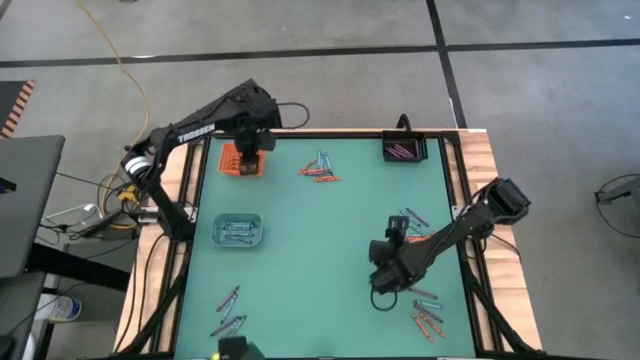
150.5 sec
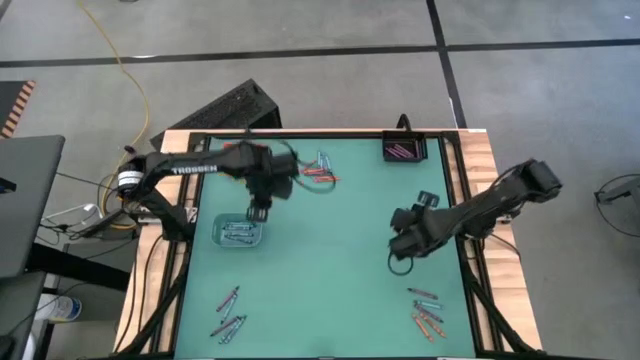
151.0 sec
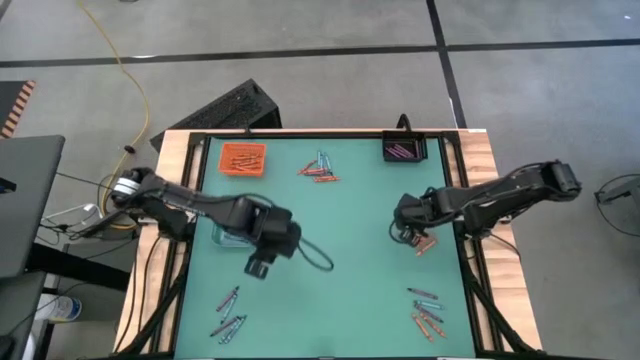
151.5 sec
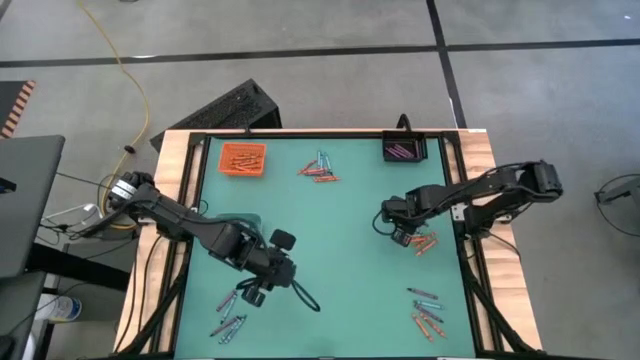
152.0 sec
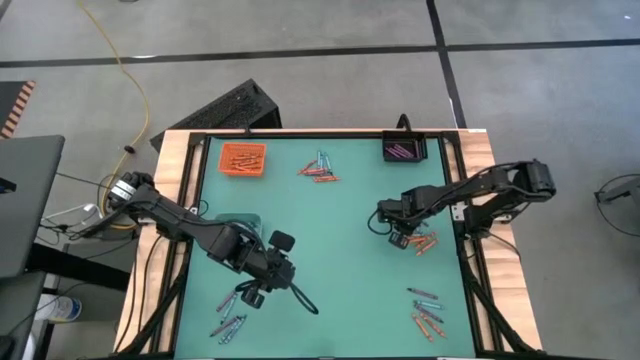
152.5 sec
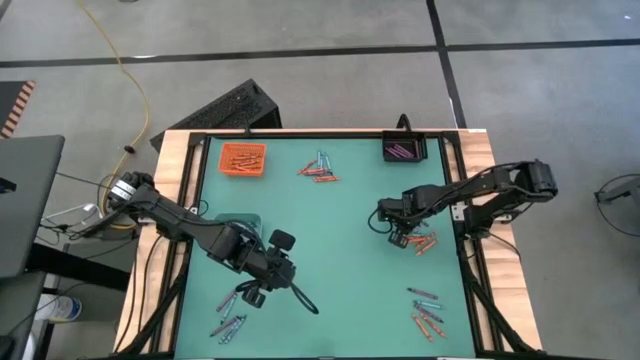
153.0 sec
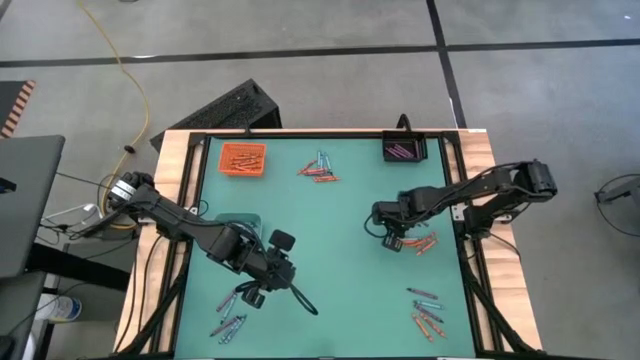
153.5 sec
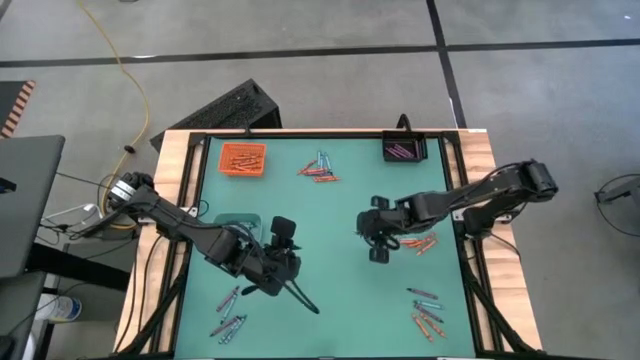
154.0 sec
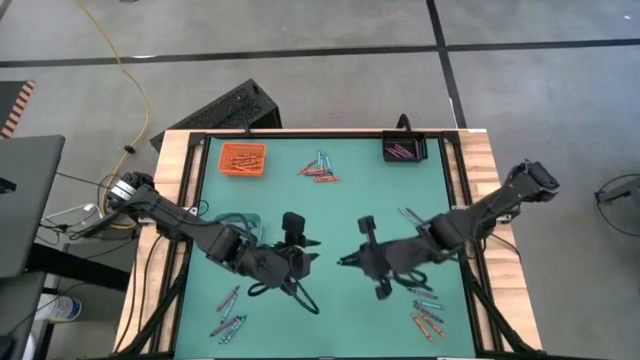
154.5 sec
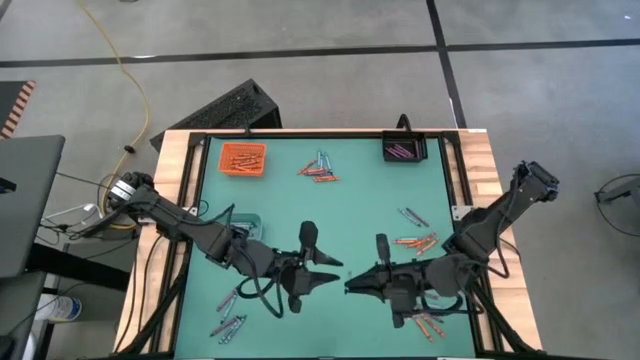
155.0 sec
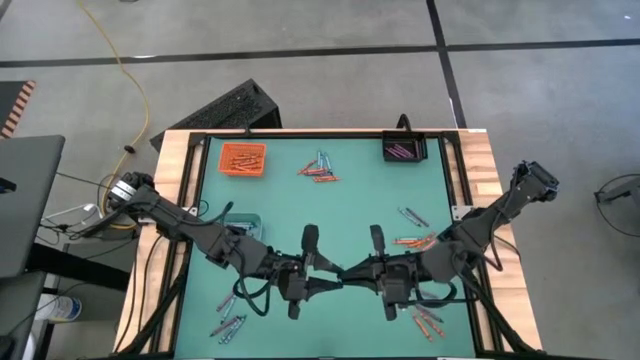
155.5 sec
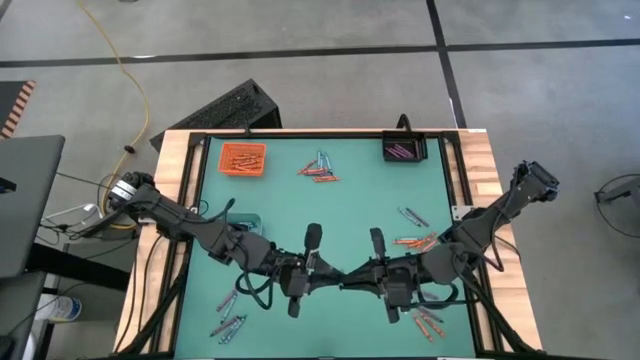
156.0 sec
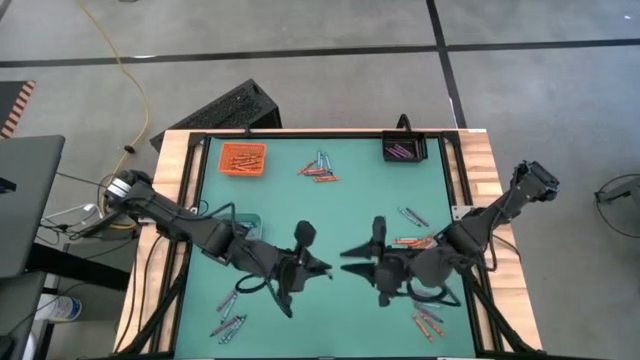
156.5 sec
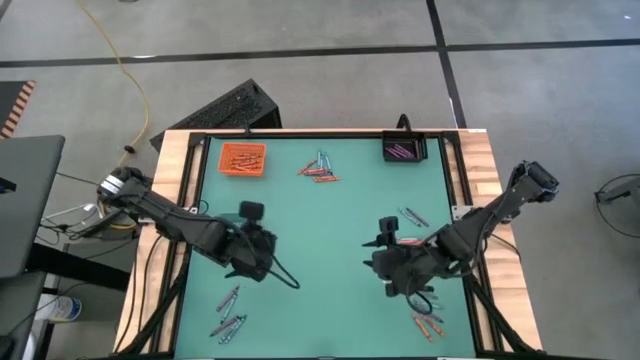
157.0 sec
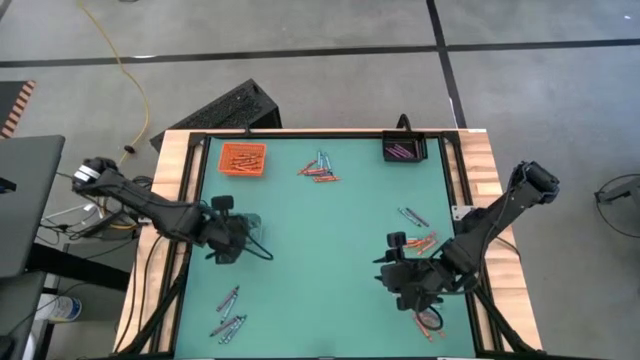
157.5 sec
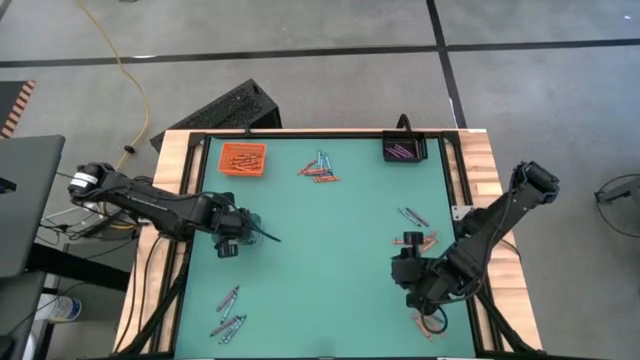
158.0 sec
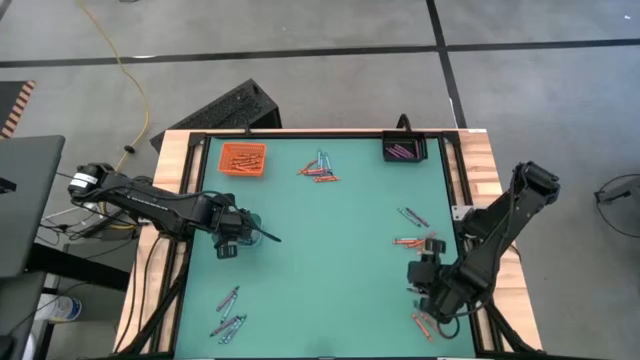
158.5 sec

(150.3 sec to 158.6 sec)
Task: Sort crayons
Put the blue crayon into the left blue bin

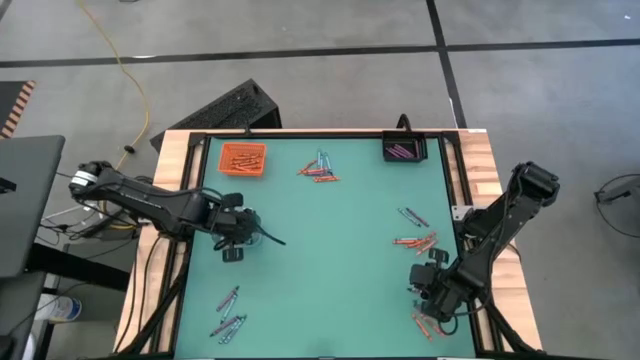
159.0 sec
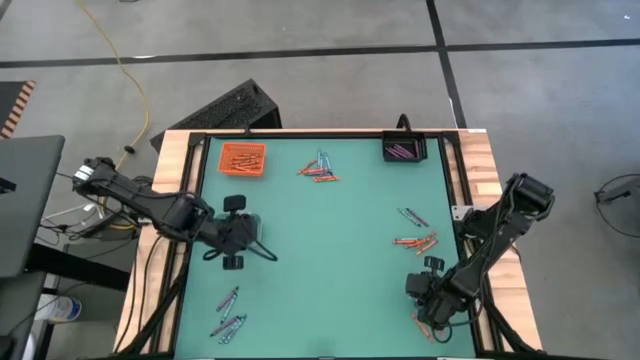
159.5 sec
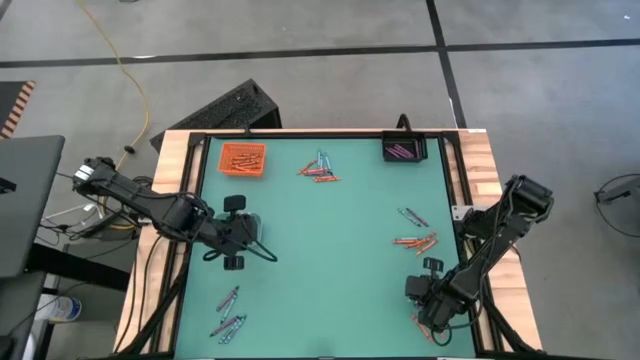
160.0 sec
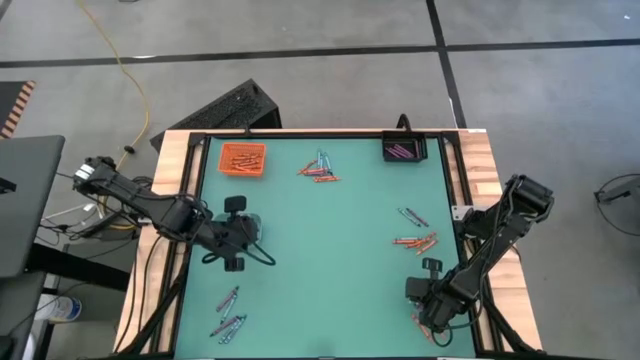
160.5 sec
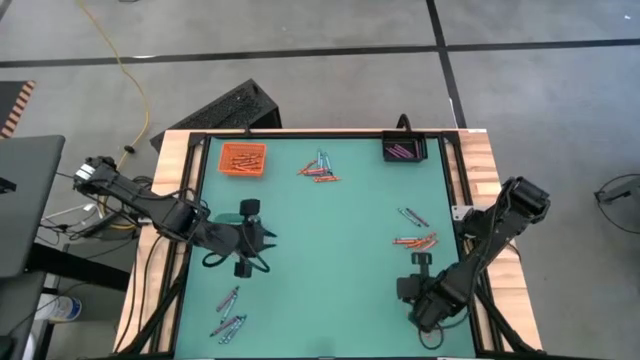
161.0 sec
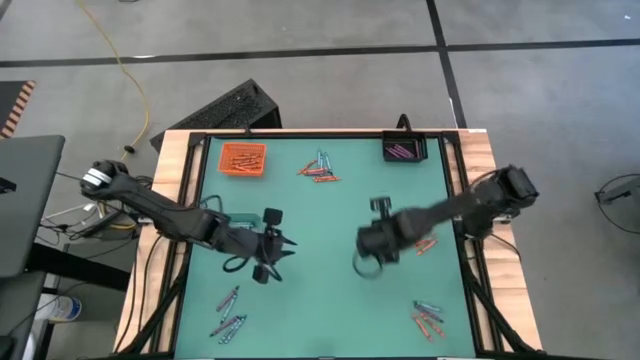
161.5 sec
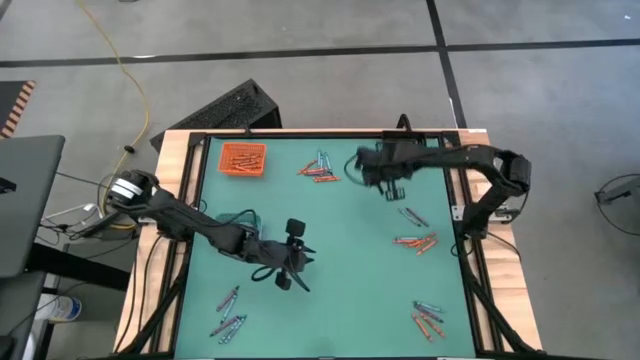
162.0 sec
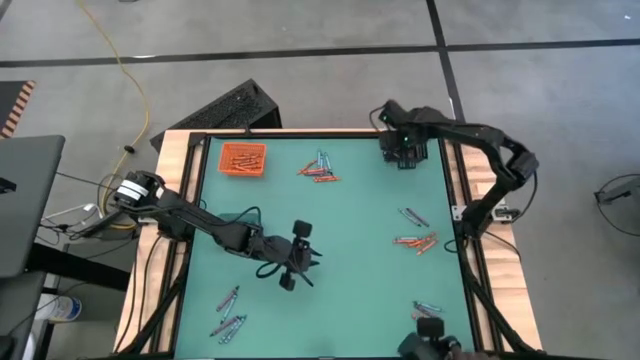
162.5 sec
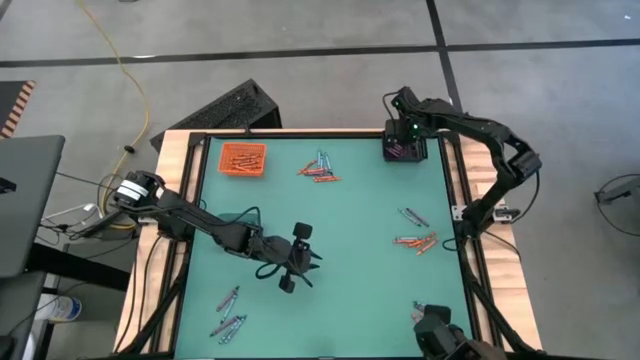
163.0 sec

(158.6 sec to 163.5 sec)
Put the purple crayon into the top black basket

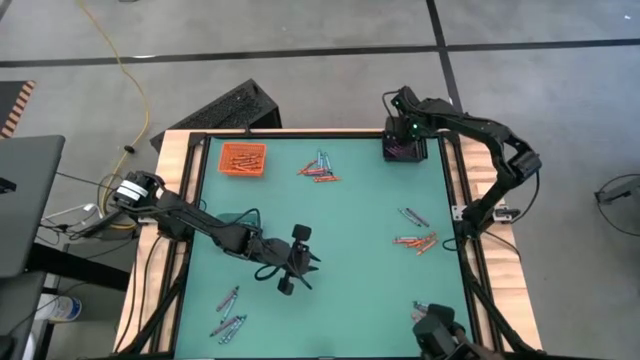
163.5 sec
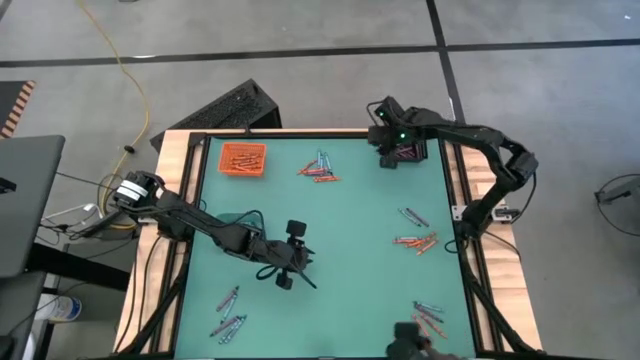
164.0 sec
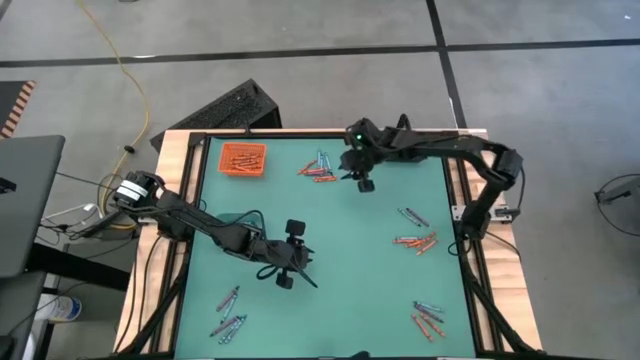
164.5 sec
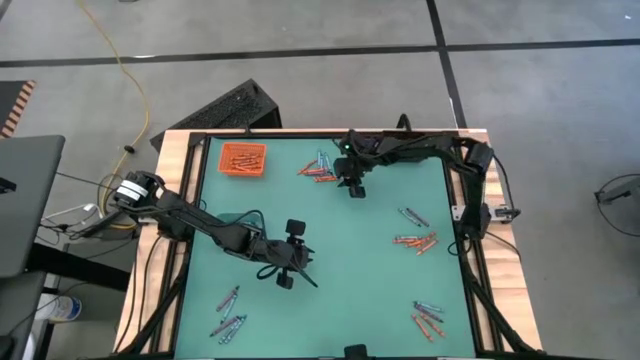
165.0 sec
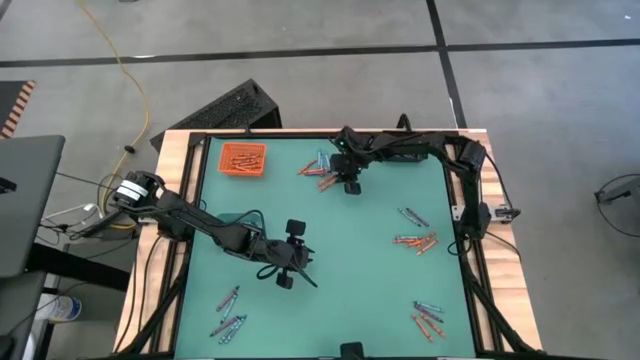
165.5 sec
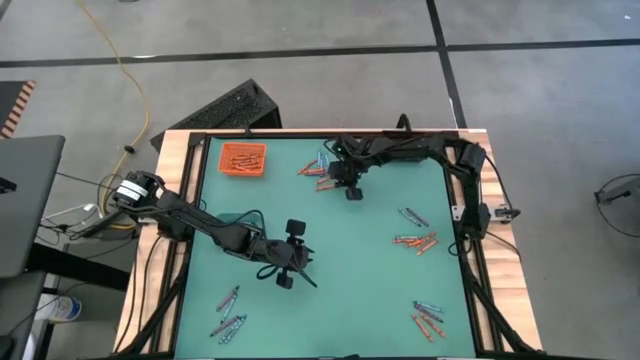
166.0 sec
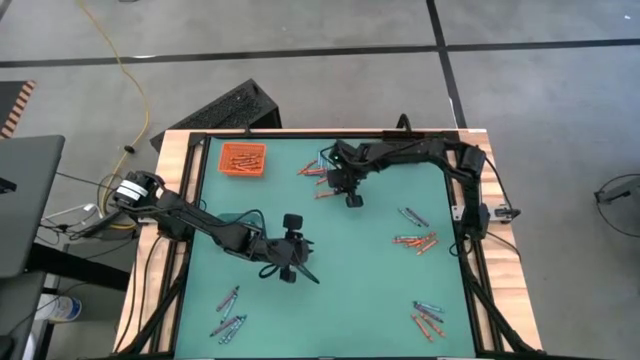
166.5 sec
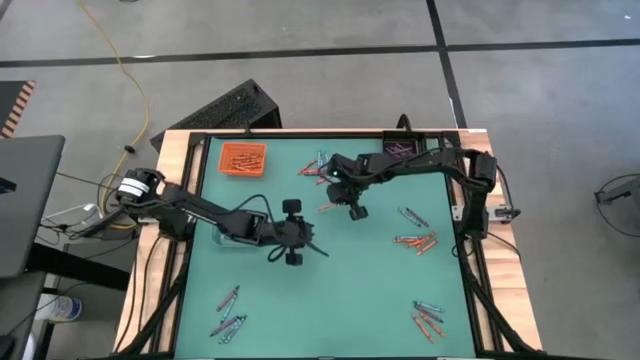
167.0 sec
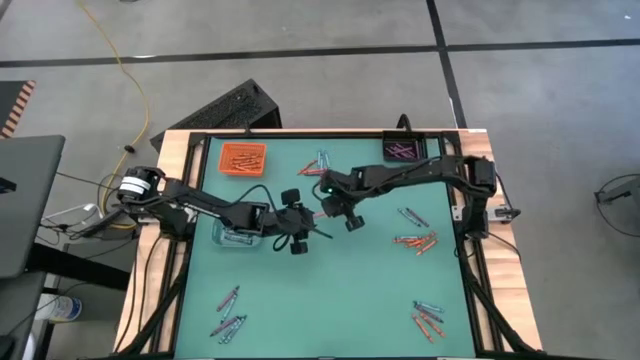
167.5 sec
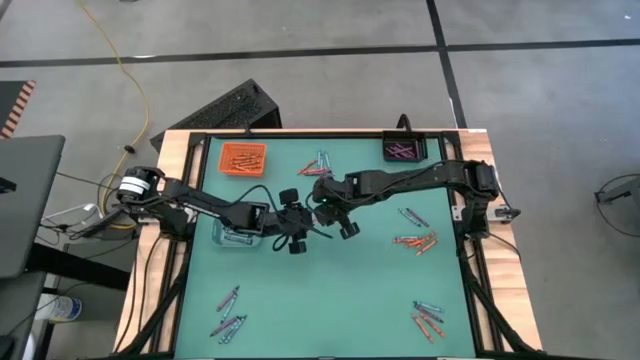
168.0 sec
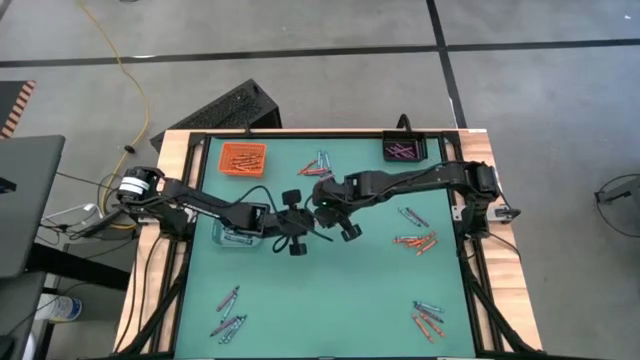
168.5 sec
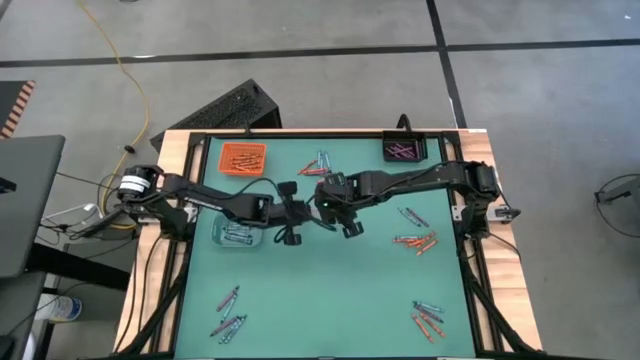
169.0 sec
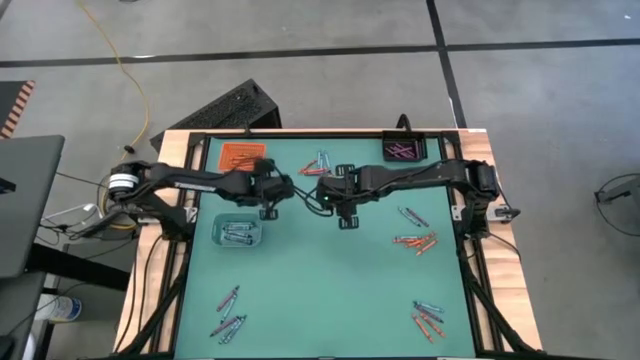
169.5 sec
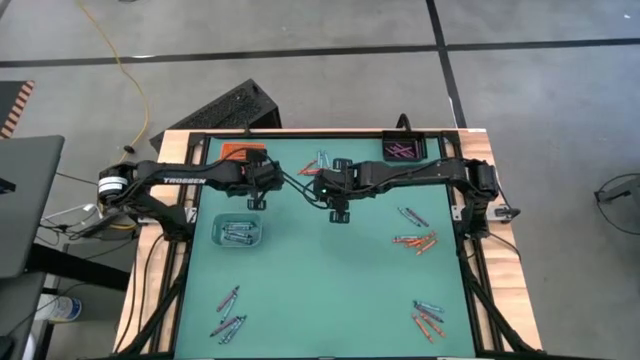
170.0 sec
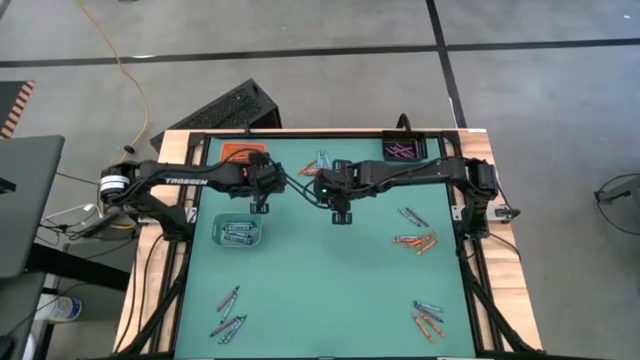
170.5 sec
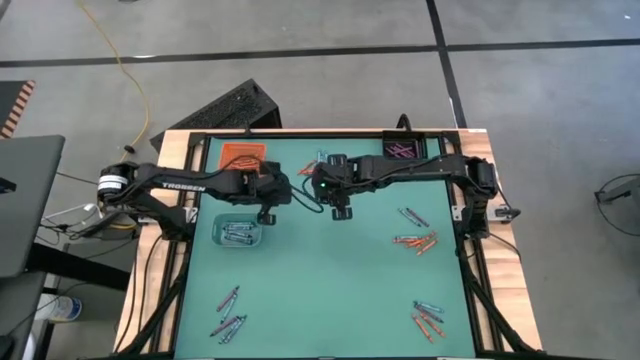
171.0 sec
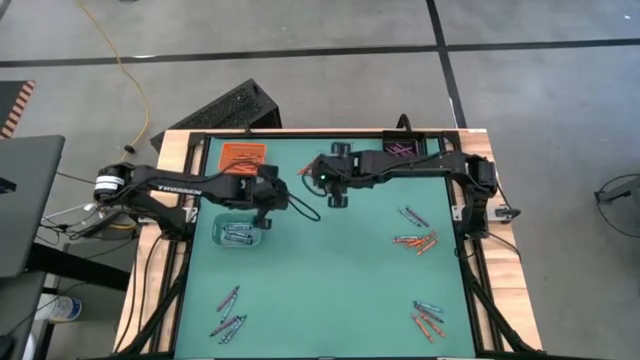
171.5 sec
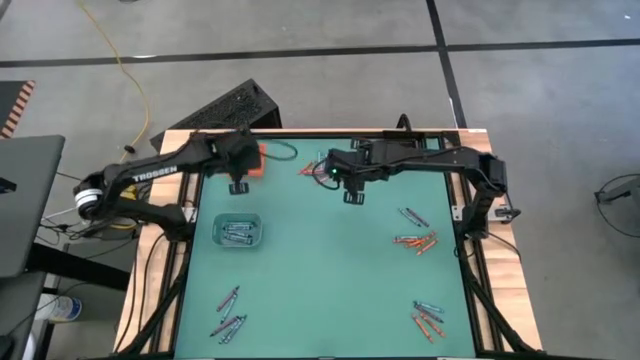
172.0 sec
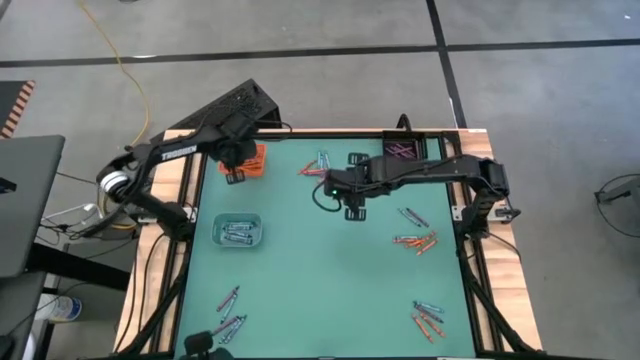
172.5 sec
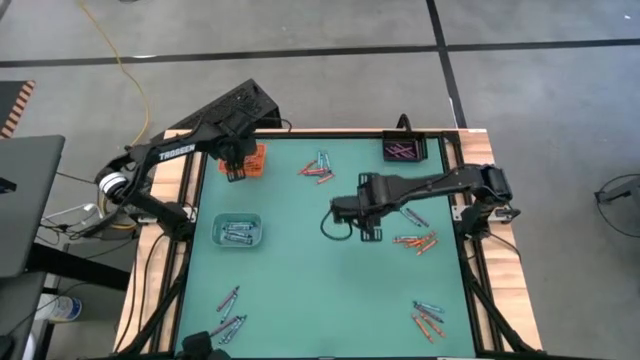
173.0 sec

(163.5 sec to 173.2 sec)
Put the orange crayon into the orange basket
